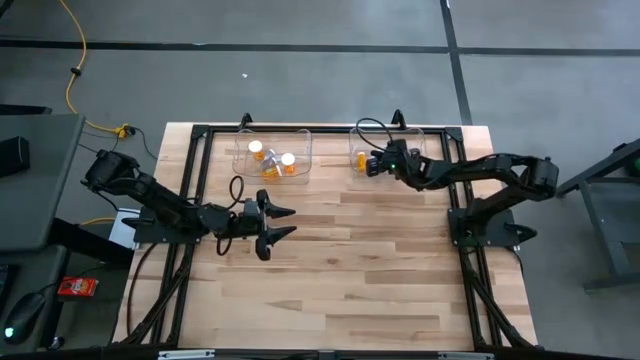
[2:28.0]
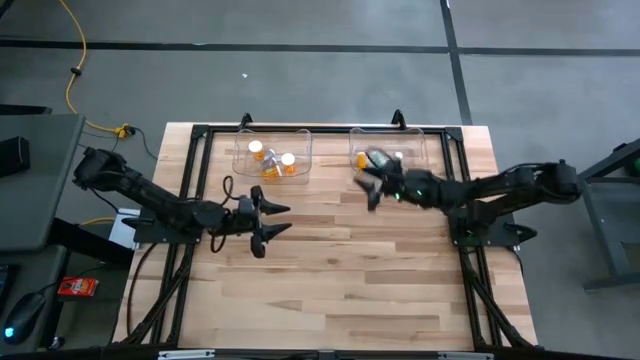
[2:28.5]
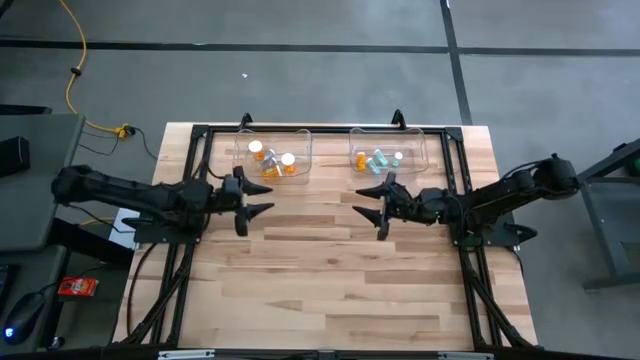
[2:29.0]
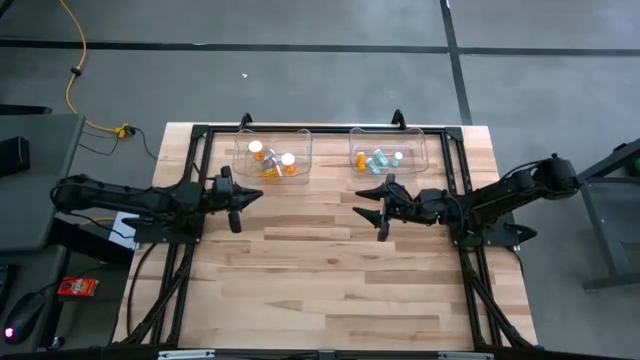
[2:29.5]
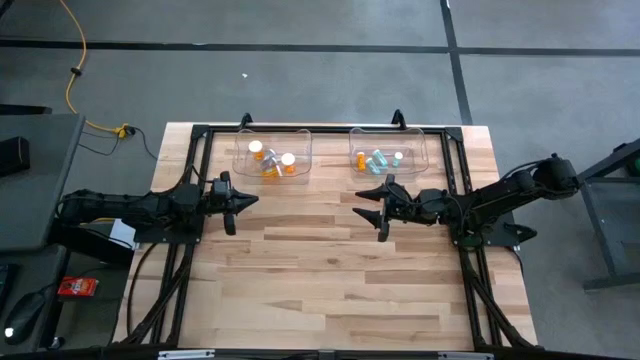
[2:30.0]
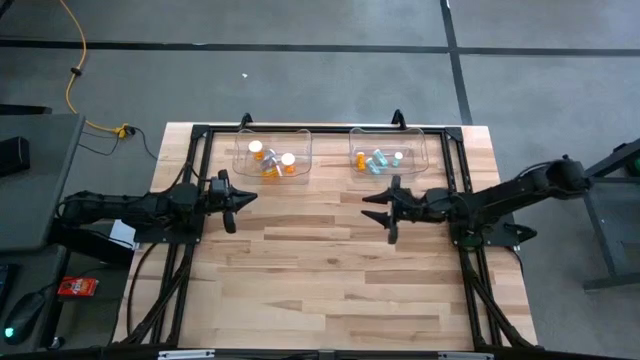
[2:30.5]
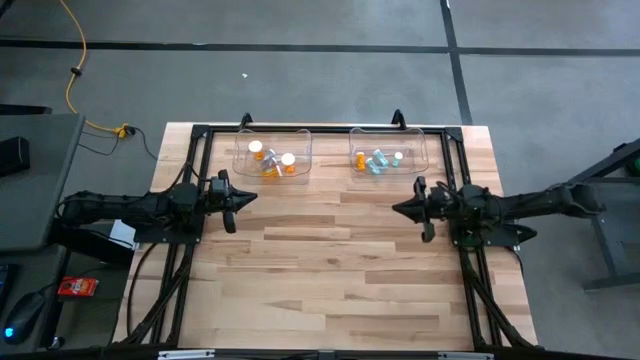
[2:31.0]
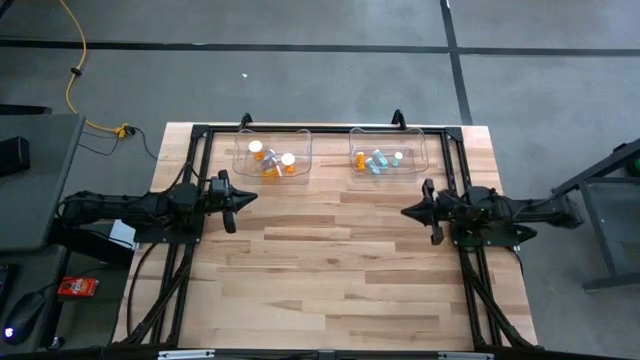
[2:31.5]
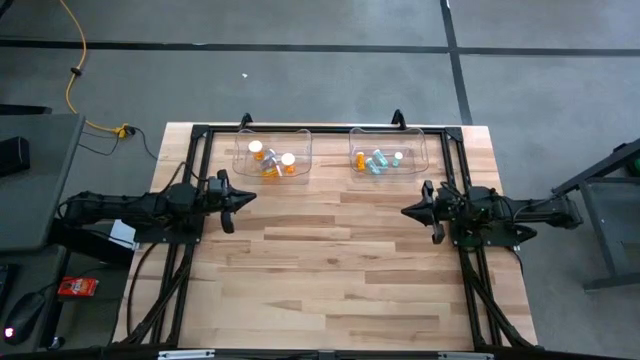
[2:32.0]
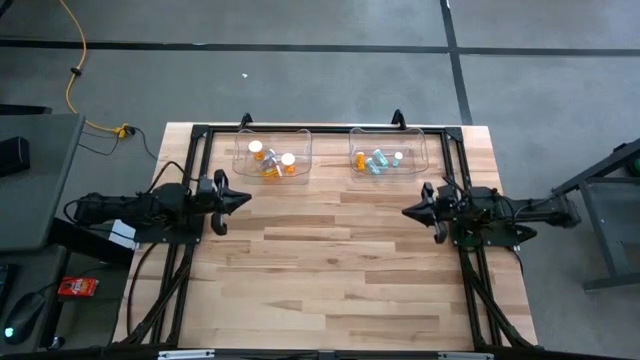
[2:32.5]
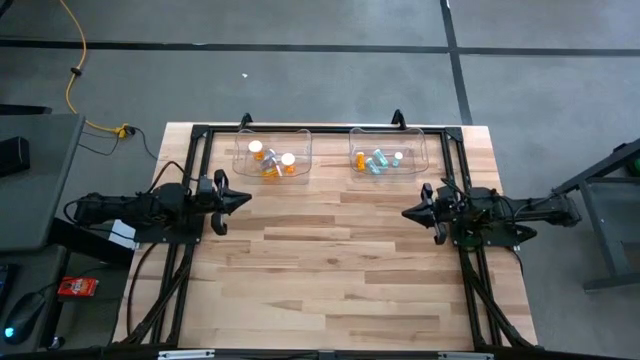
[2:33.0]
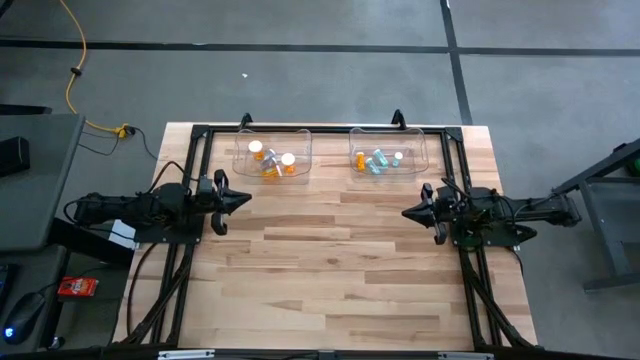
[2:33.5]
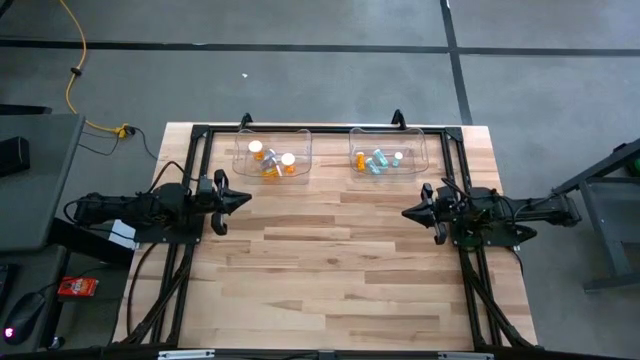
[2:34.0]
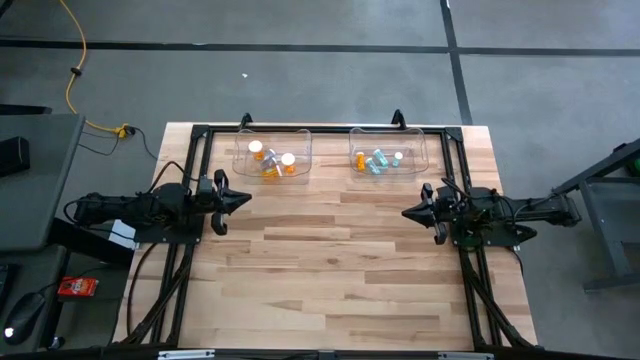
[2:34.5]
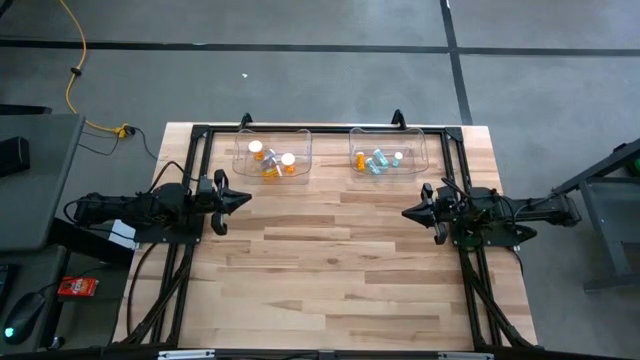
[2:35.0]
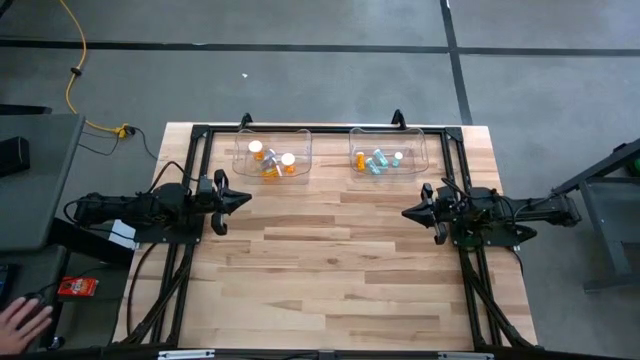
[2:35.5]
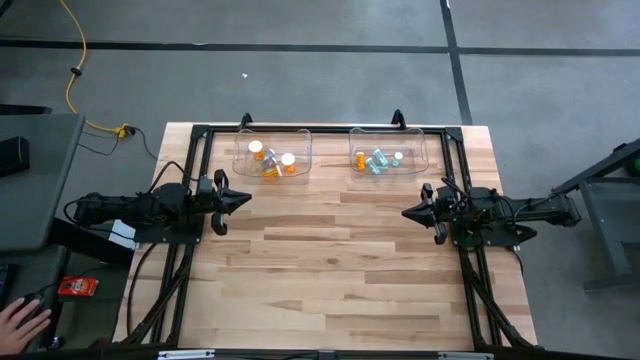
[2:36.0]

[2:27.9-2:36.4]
Task: Pick and place medicine bottles into bin by pill shape (circle, oval)
Return to Home Position

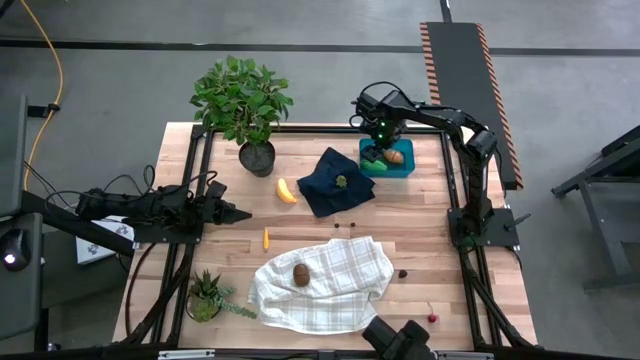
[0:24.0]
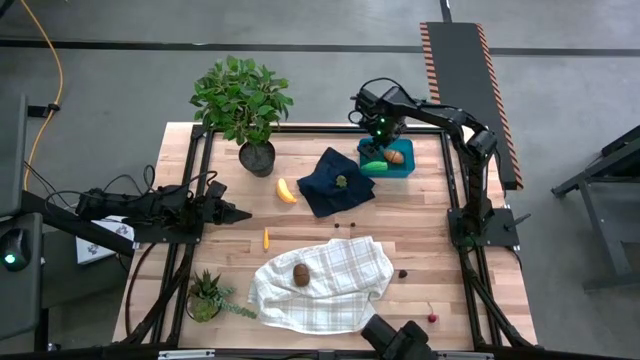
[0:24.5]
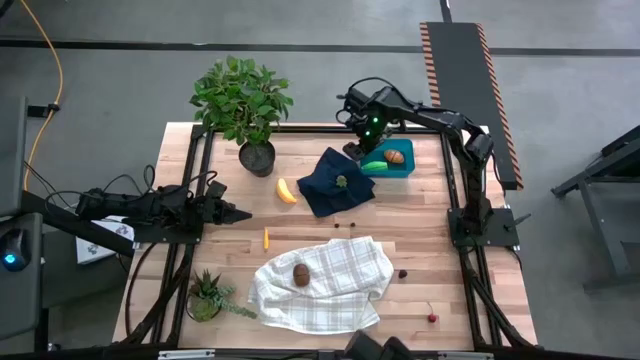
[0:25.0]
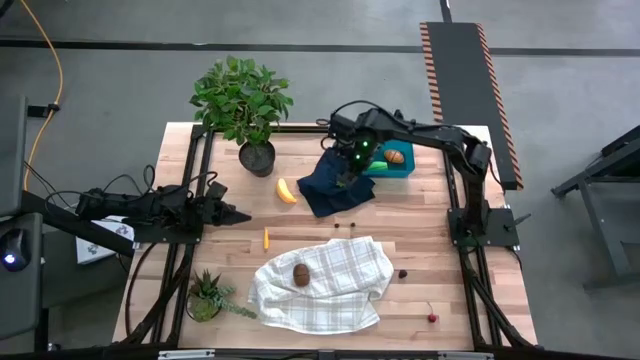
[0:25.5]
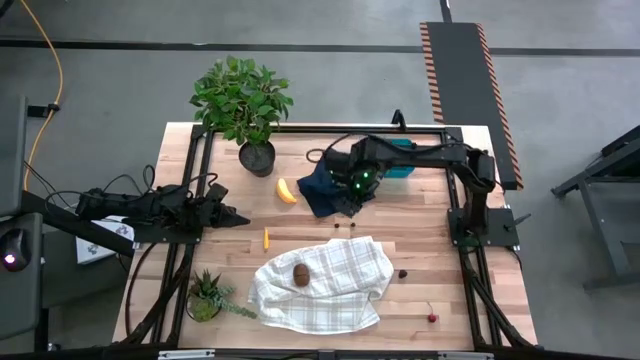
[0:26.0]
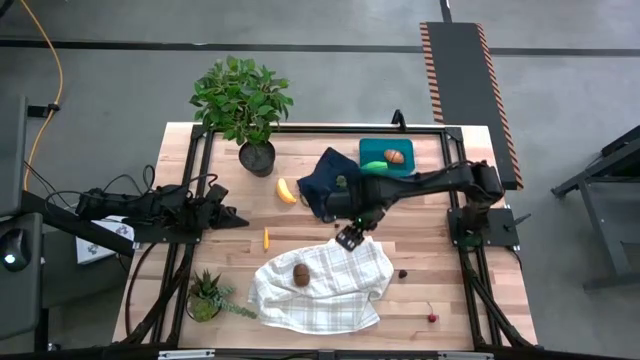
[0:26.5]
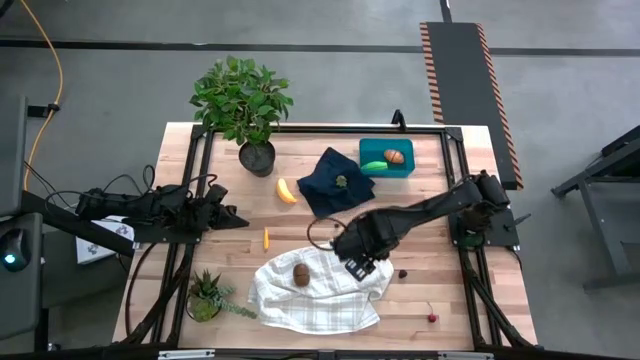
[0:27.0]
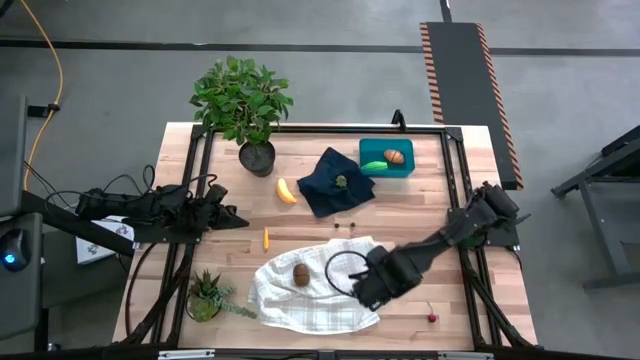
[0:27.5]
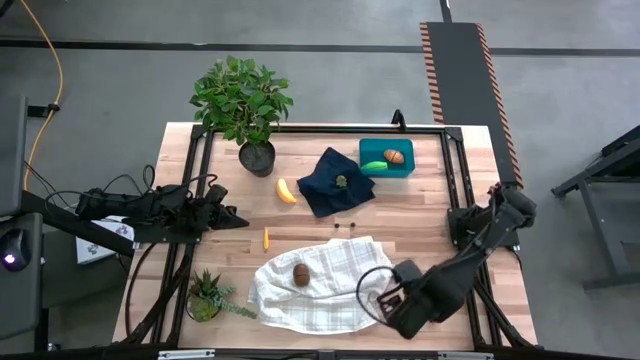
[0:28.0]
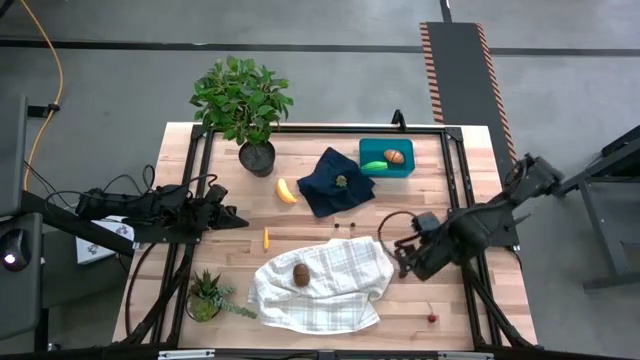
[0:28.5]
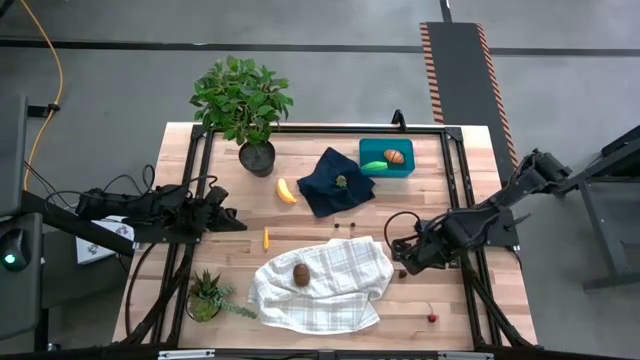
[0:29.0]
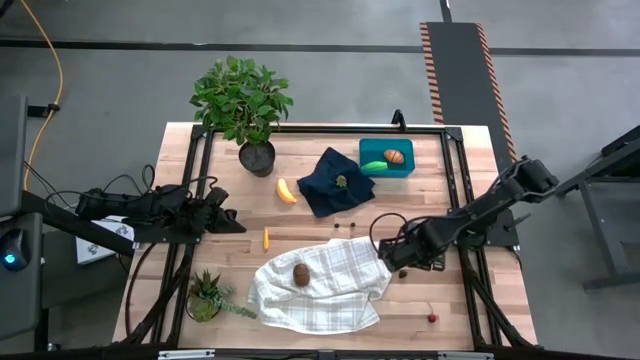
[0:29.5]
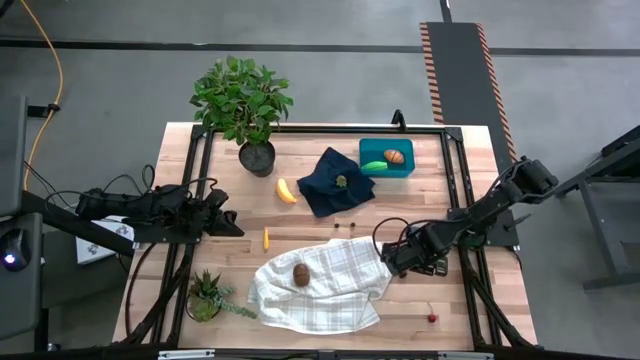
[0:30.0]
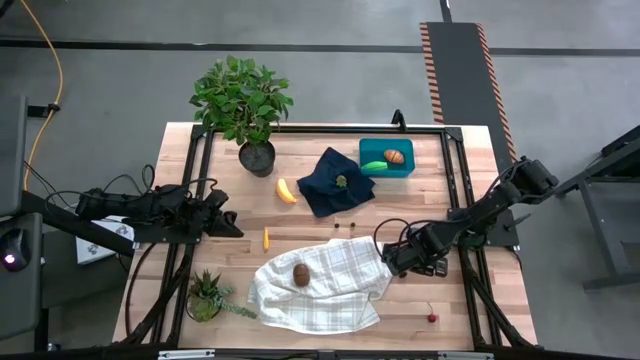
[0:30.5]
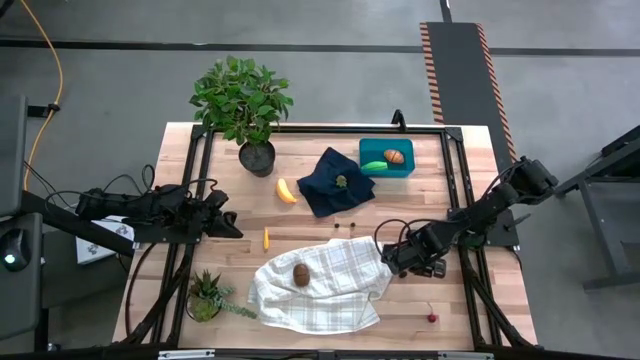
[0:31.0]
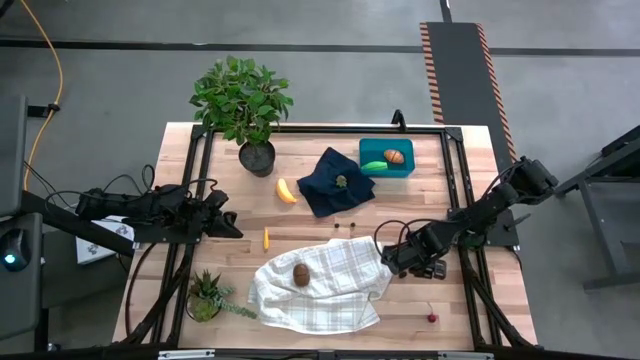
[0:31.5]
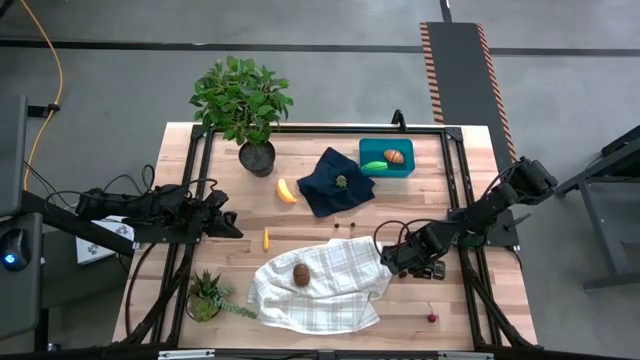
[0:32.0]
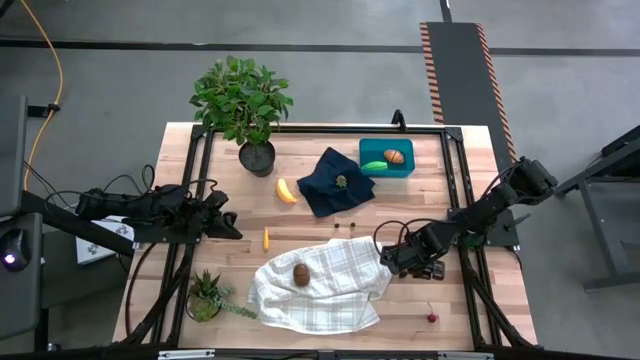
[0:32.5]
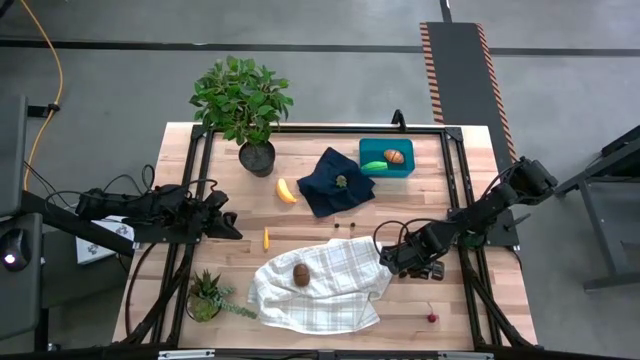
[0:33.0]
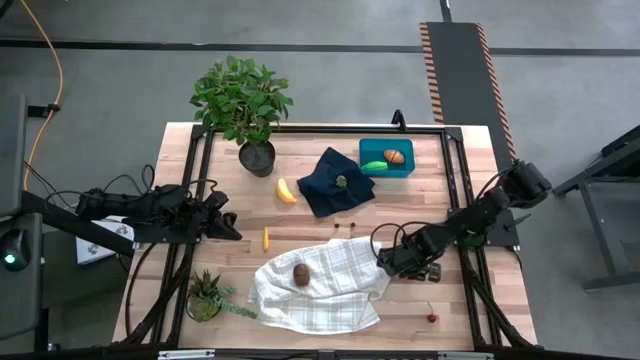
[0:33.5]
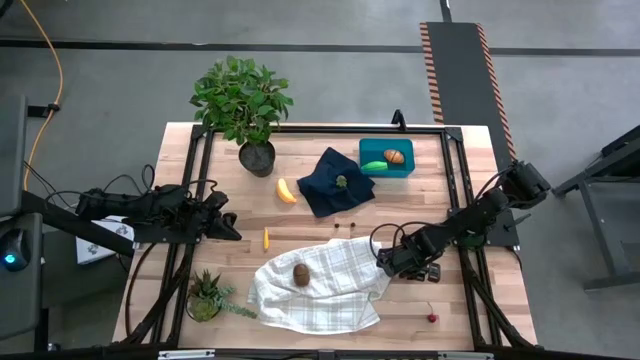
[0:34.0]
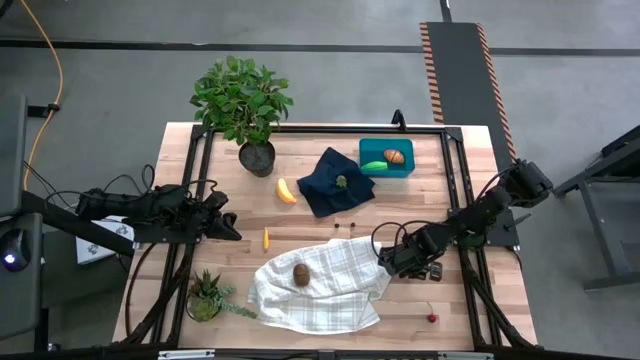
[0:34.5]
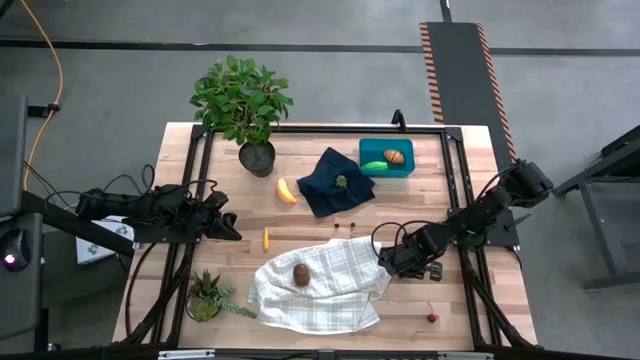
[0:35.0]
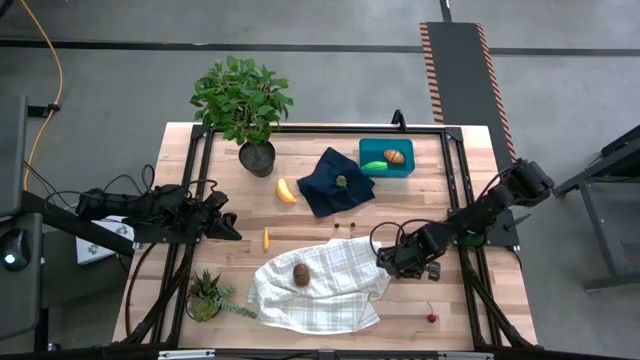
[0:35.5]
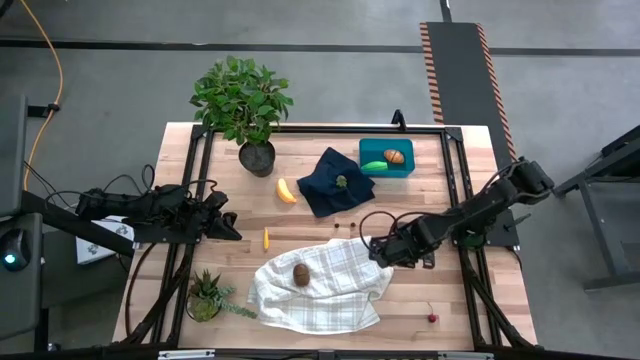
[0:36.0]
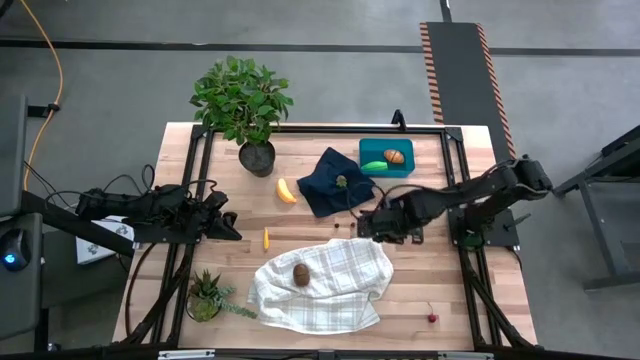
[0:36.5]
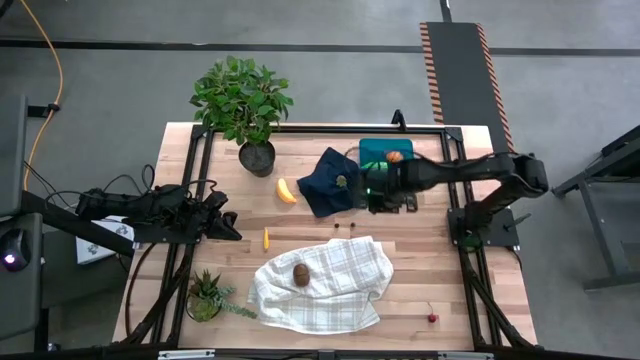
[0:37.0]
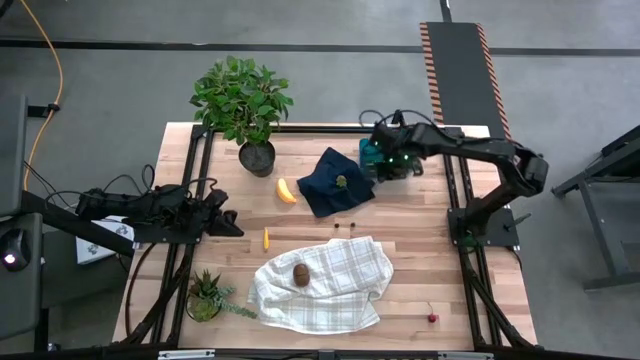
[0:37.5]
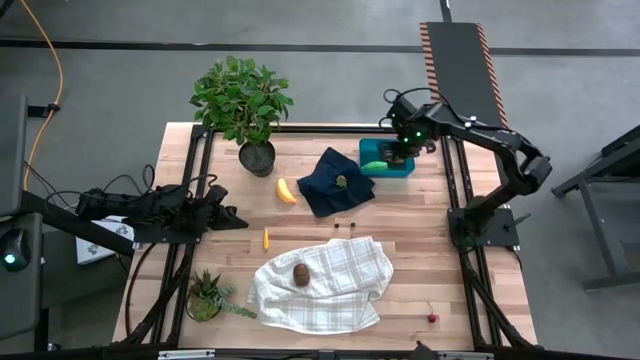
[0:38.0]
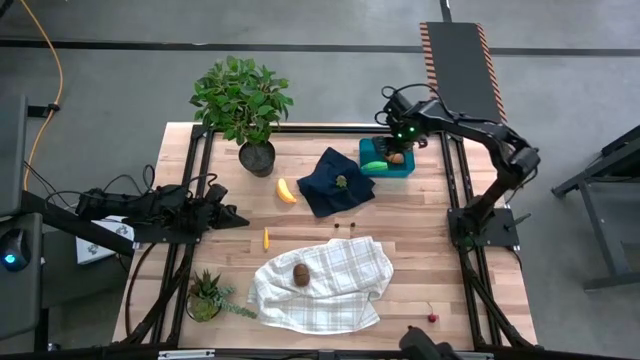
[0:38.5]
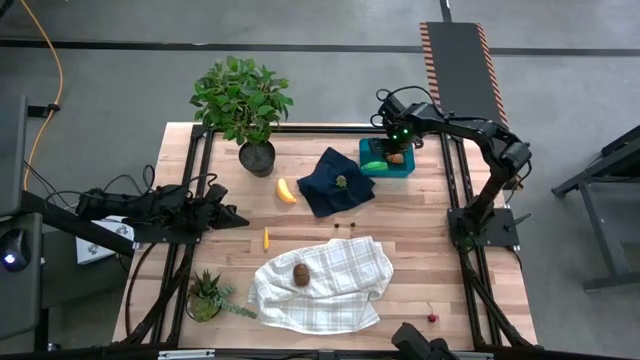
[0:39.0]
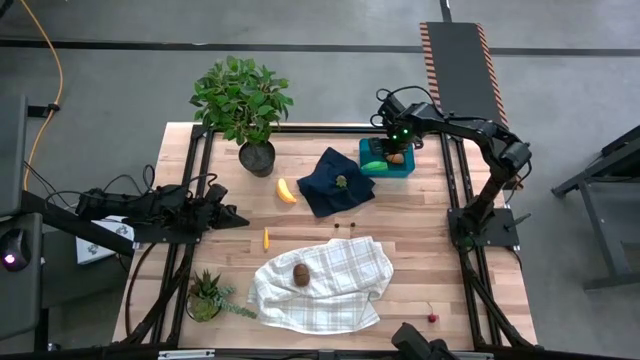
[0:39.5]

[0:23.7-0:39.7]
Task: Pick and placing Produce into tupperware
Put the blackberry into the blue bin
